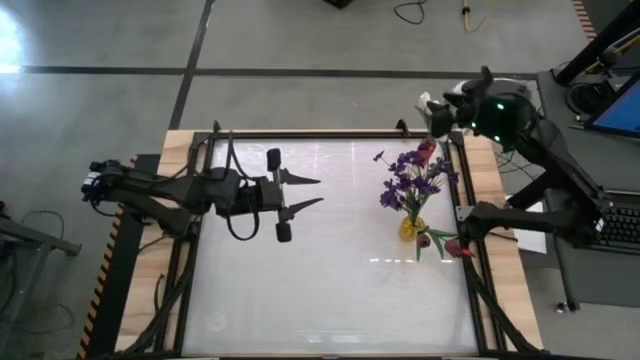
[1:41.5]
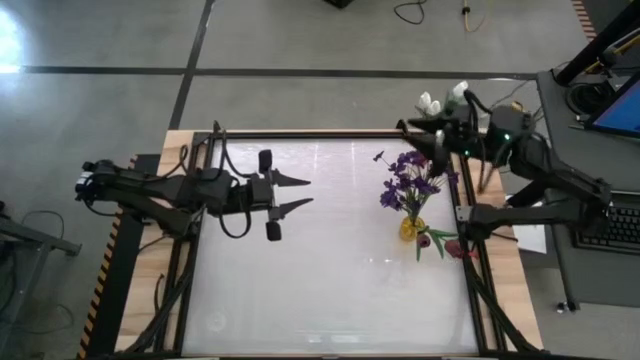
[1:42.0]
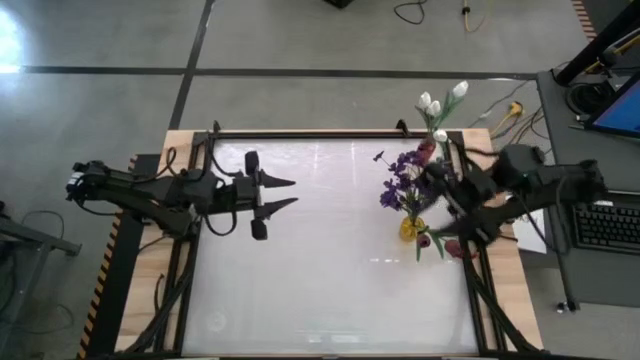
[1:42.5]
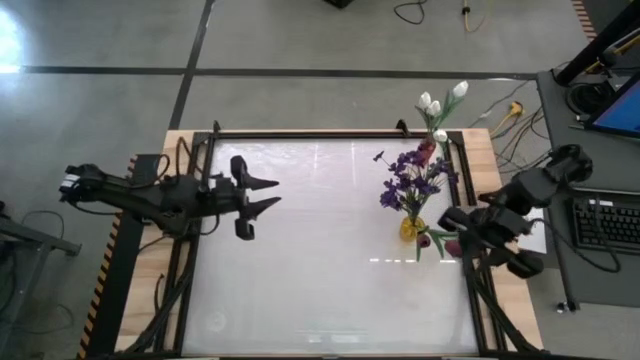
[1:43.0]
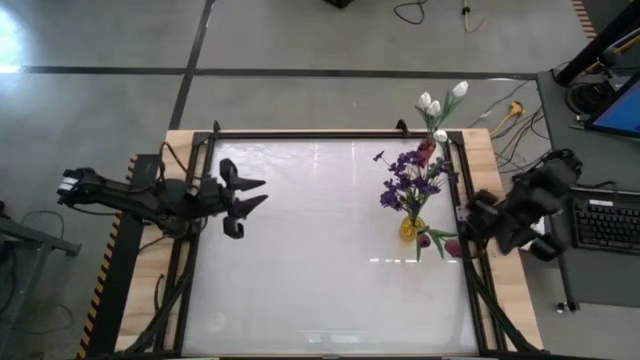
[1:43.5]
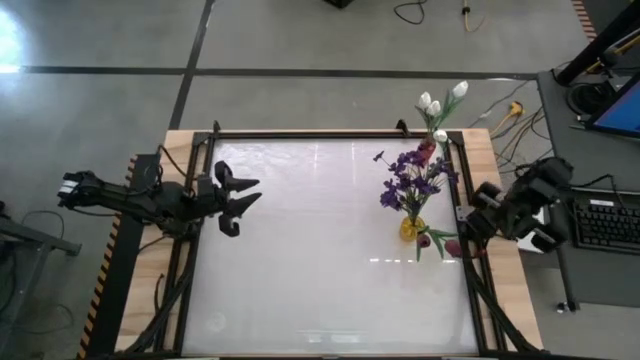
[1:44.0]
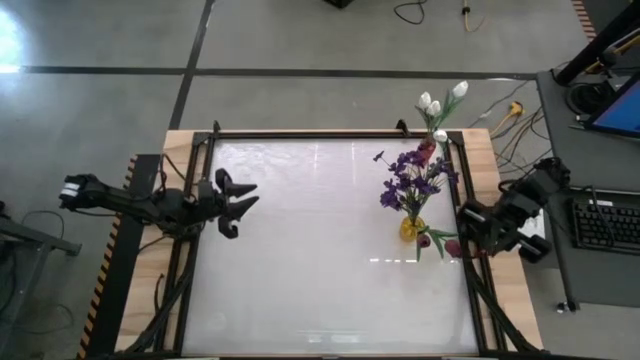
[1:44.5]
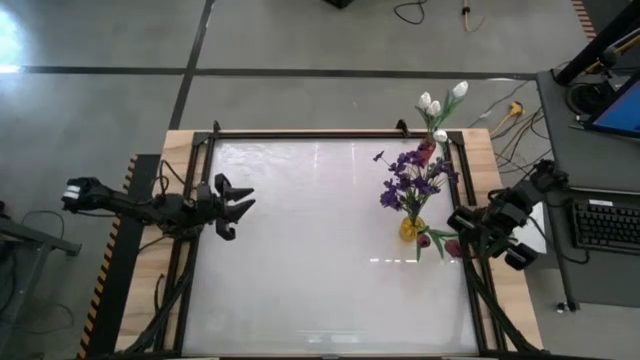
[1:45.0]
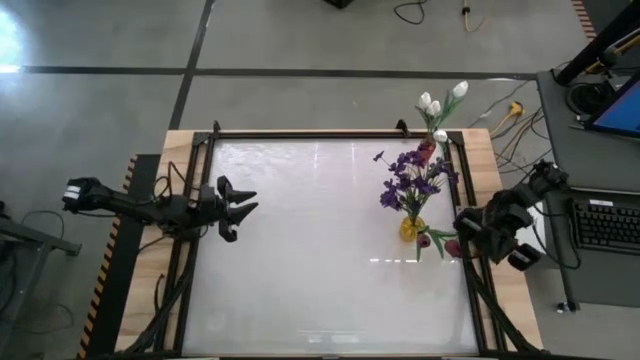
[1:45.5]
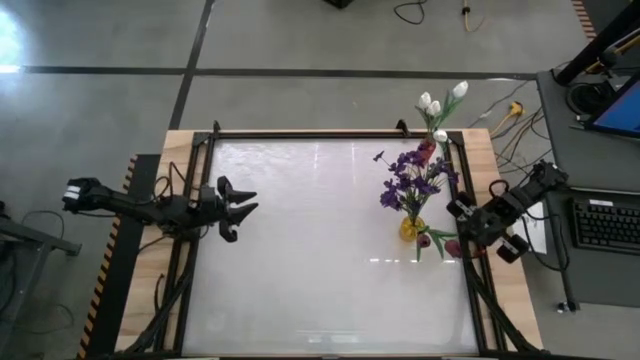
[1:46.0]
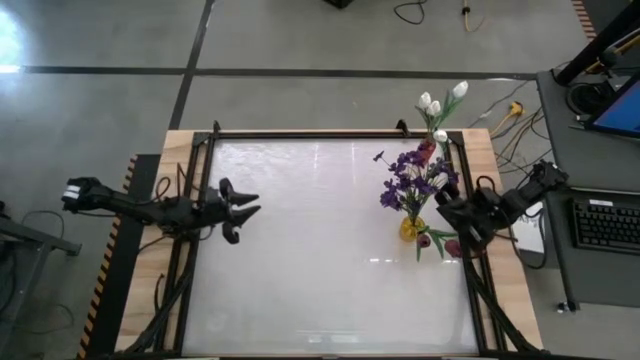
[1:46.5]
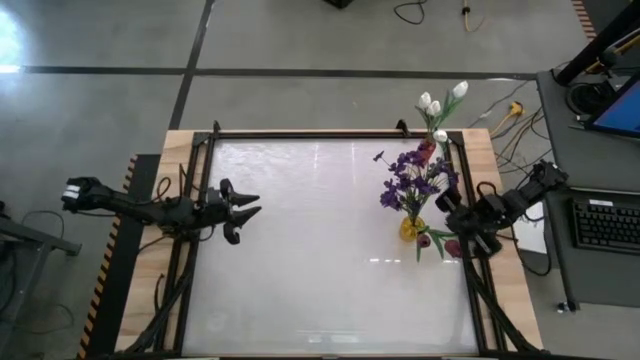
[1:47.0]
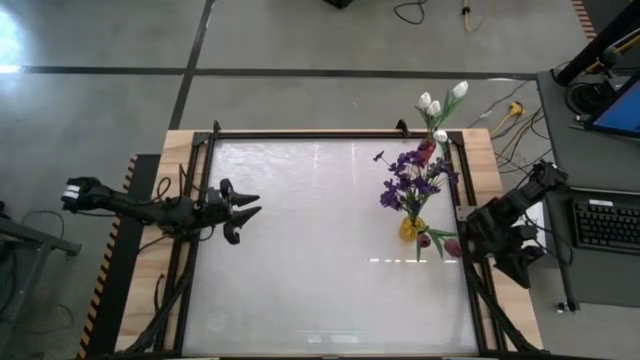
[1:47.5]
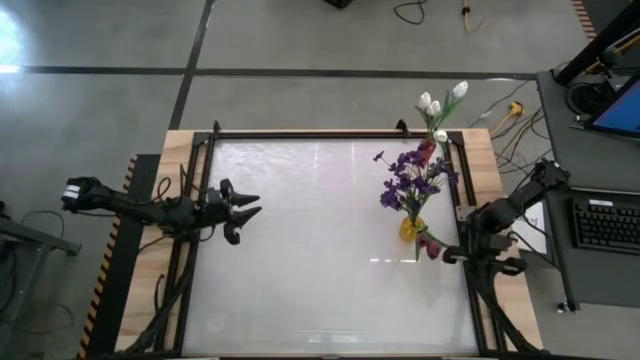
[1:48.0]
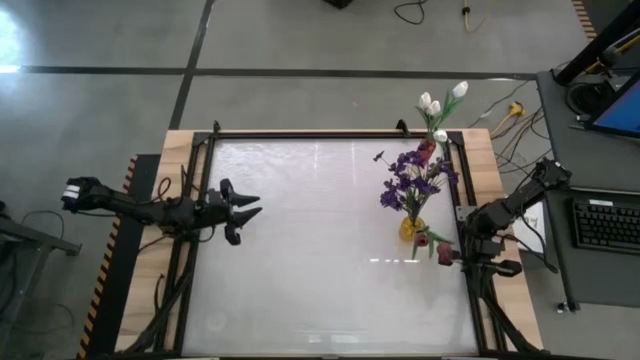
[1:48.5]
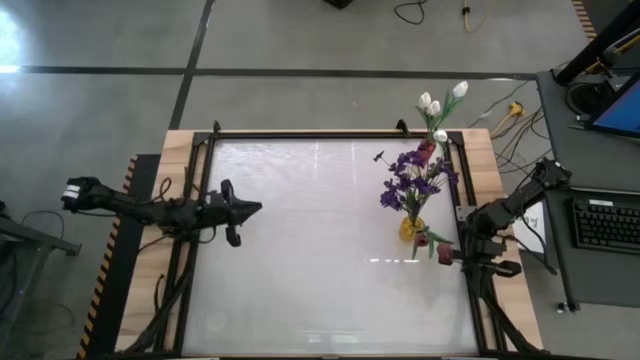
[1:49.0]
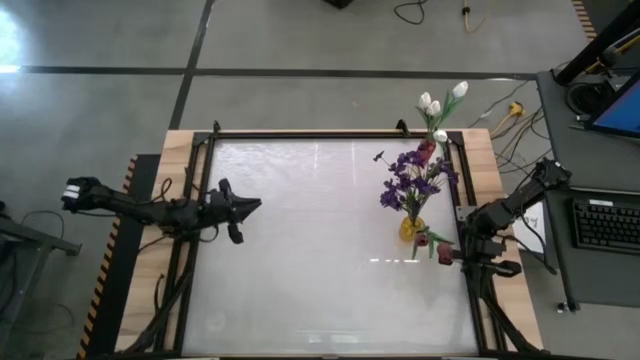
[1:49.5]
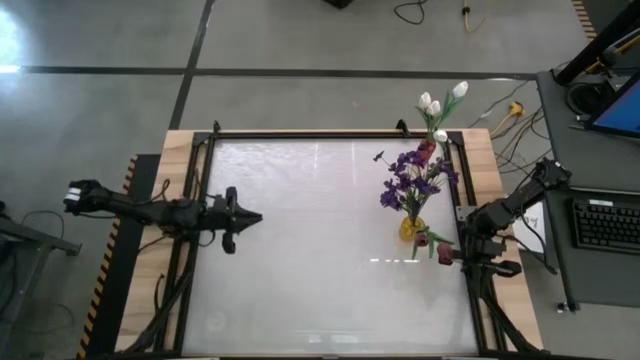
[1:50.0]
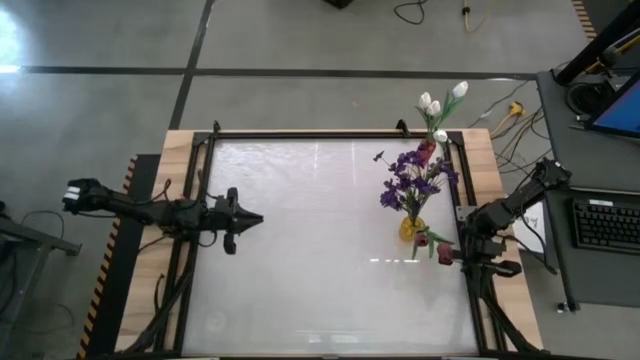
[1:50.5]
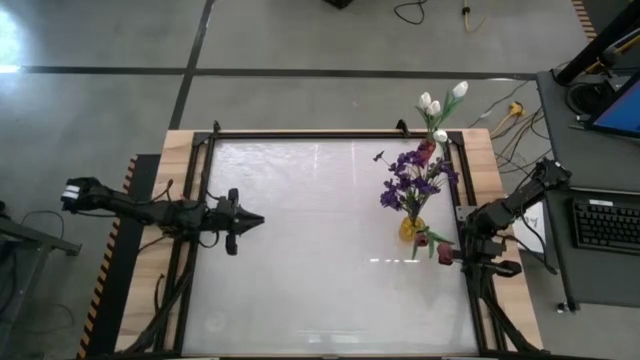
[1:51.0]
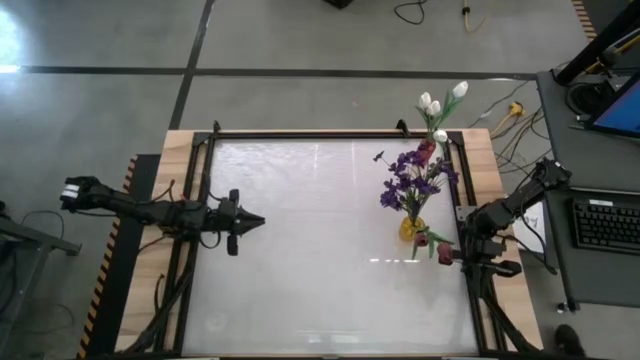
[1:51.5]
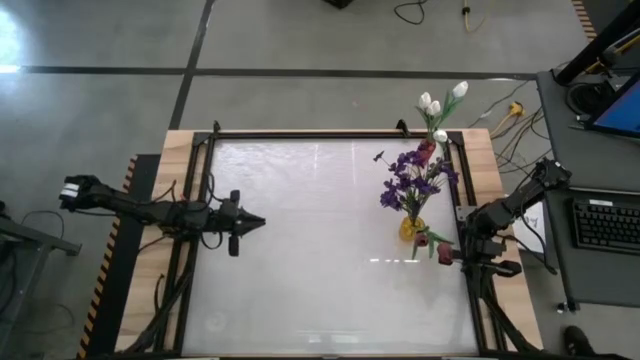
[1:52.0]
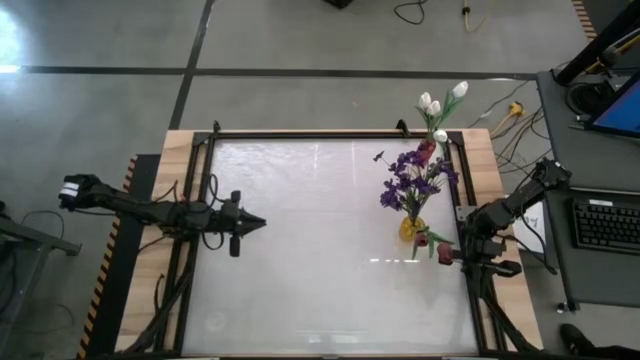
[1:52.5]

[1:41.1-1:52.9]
Task: Sort flowers into vase by color
Return to Home Position
